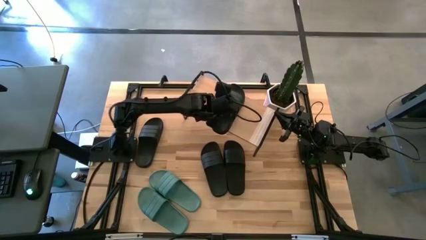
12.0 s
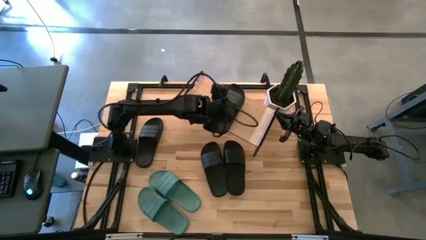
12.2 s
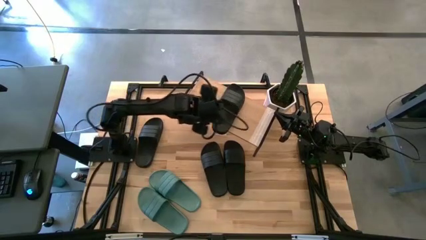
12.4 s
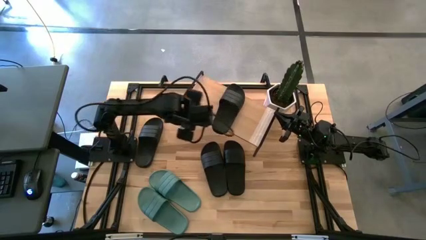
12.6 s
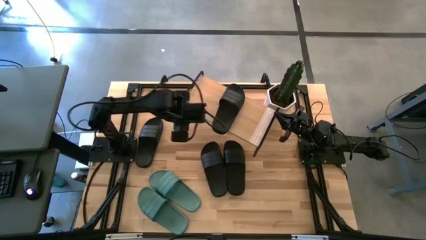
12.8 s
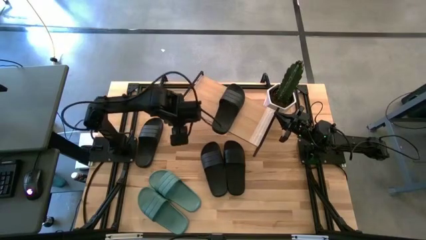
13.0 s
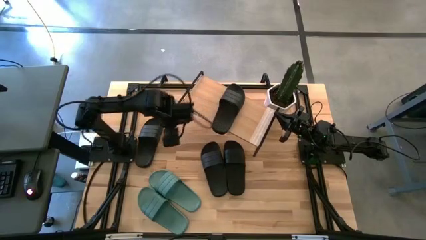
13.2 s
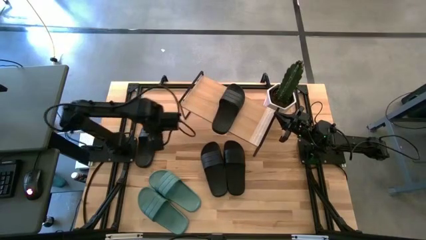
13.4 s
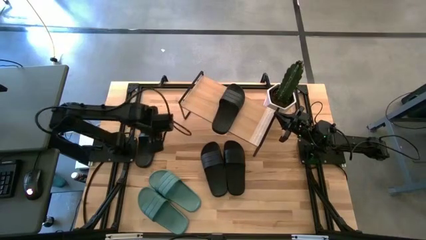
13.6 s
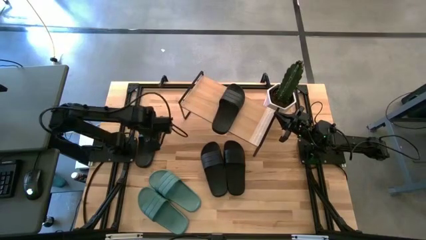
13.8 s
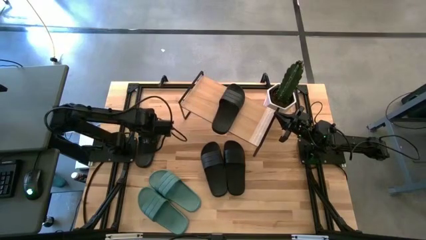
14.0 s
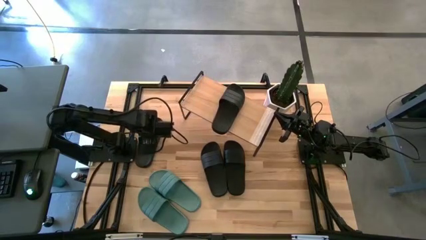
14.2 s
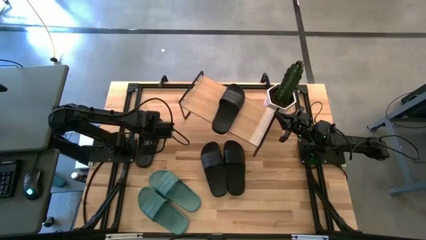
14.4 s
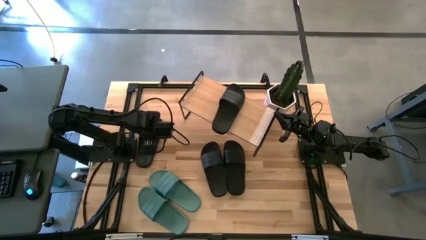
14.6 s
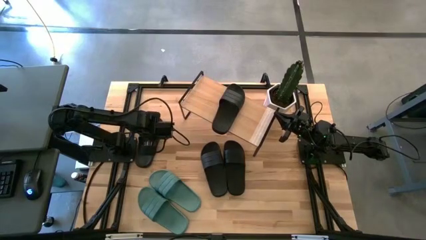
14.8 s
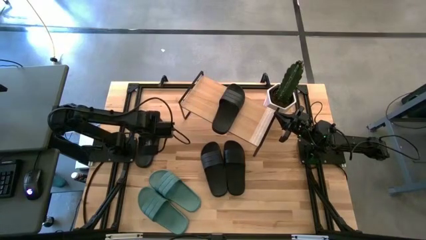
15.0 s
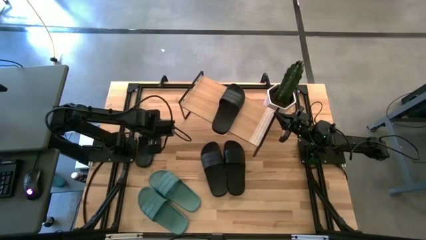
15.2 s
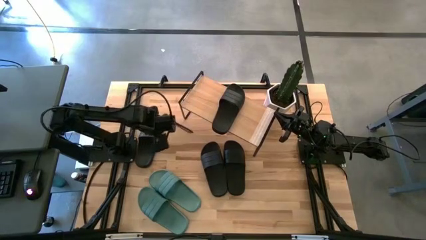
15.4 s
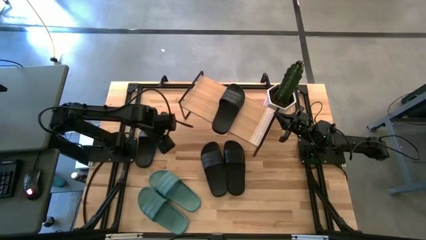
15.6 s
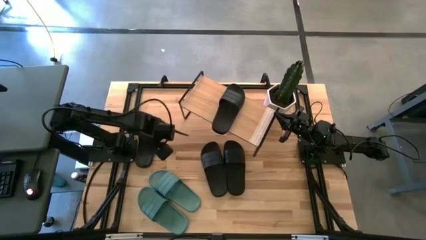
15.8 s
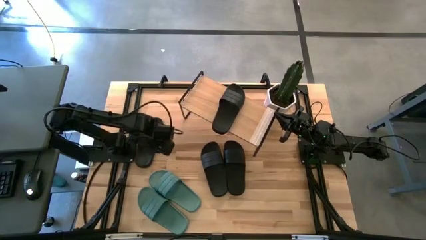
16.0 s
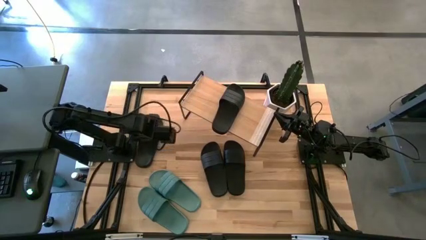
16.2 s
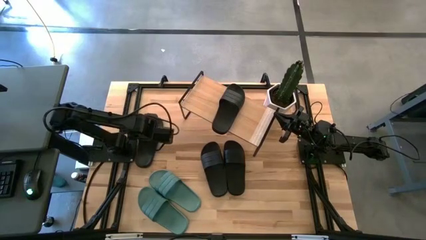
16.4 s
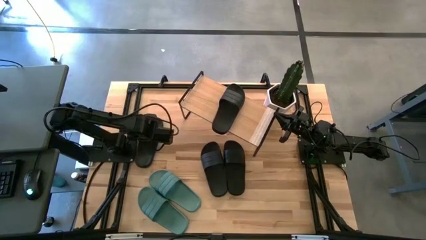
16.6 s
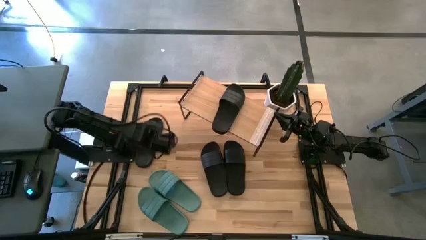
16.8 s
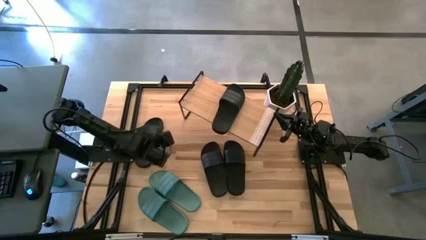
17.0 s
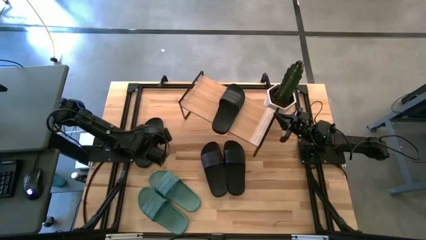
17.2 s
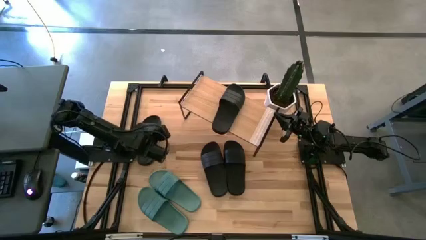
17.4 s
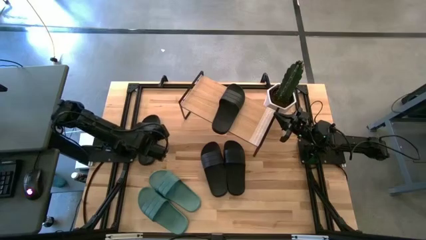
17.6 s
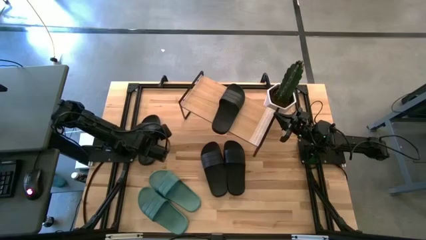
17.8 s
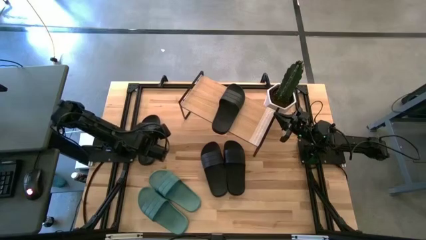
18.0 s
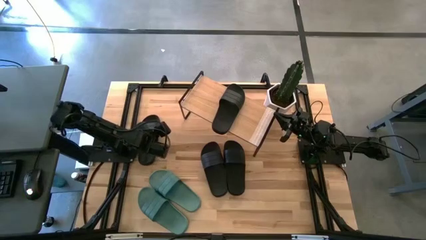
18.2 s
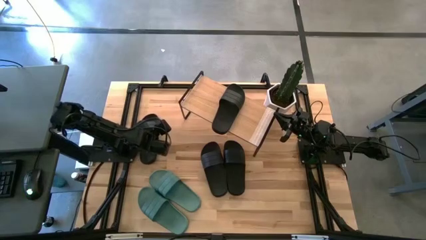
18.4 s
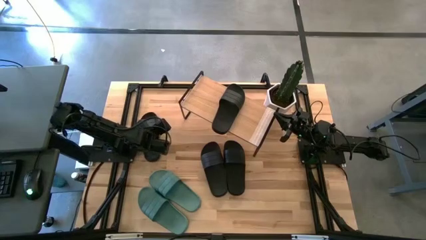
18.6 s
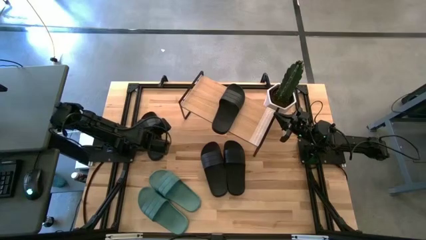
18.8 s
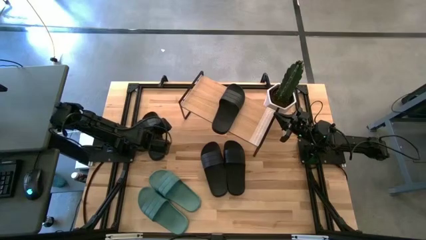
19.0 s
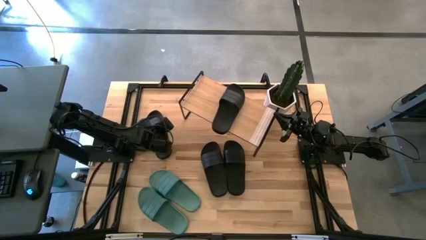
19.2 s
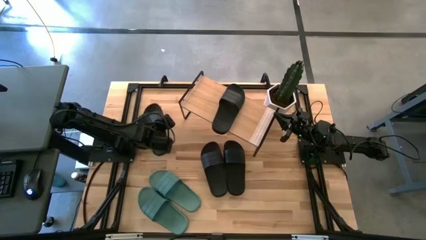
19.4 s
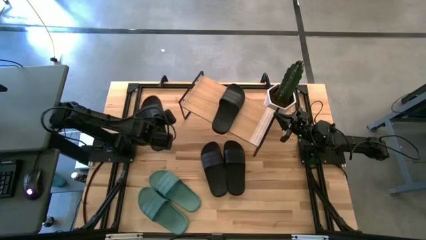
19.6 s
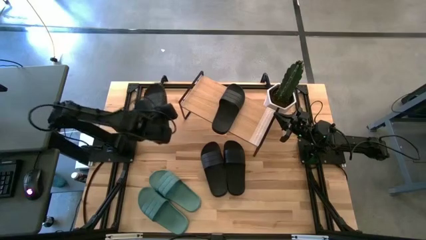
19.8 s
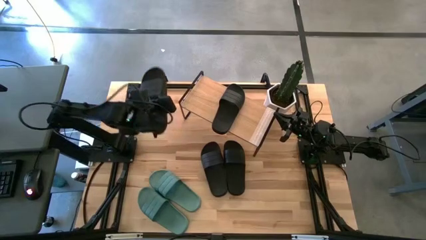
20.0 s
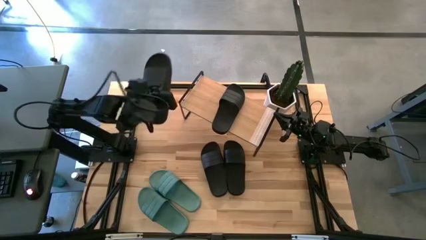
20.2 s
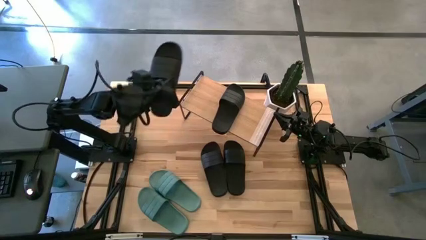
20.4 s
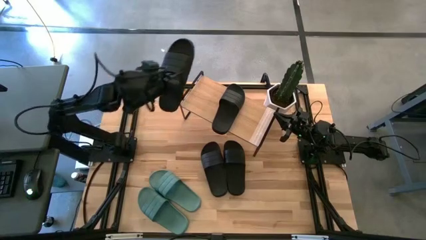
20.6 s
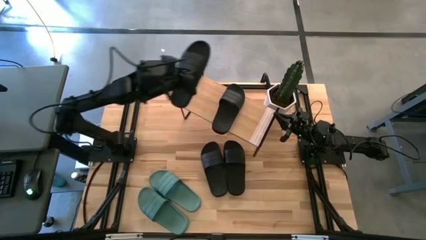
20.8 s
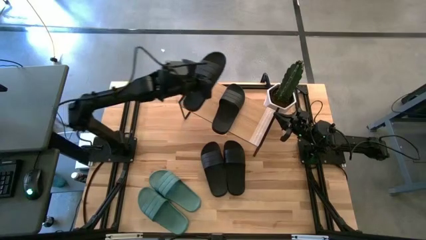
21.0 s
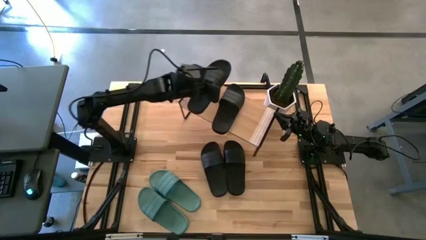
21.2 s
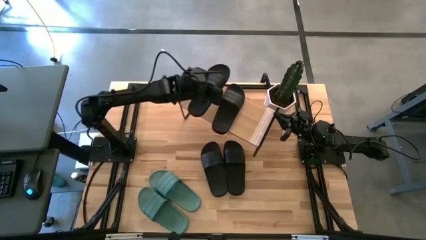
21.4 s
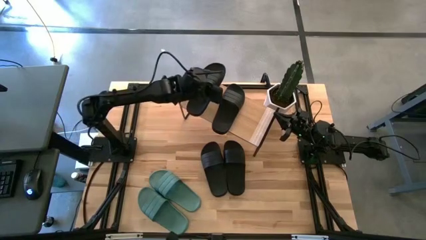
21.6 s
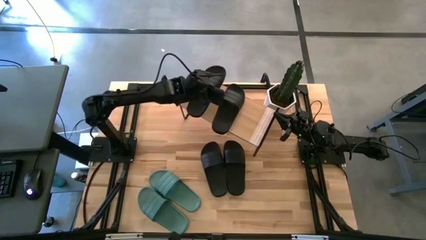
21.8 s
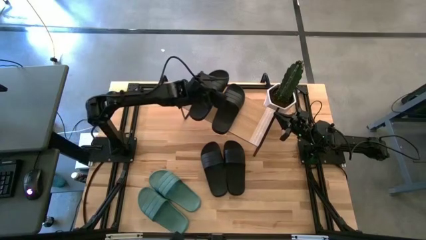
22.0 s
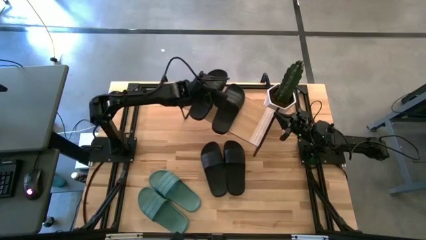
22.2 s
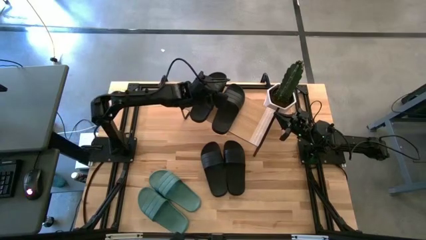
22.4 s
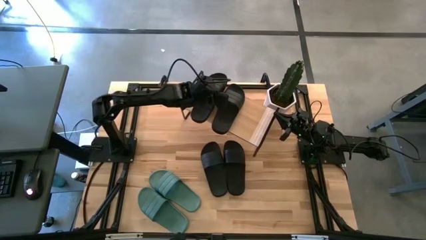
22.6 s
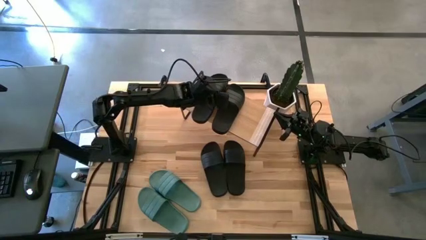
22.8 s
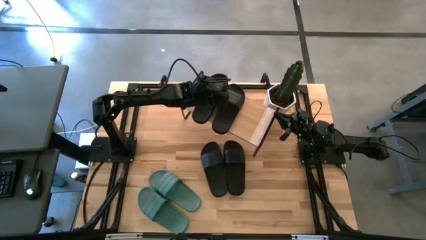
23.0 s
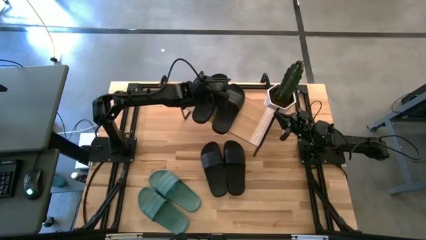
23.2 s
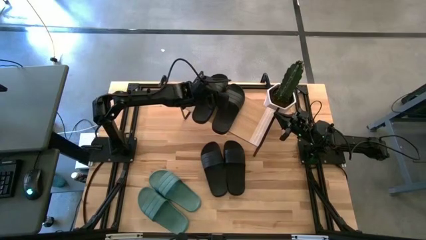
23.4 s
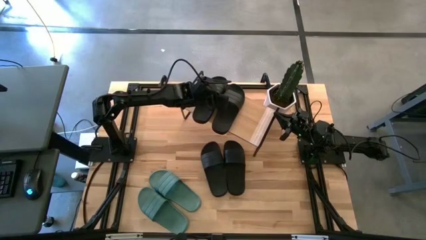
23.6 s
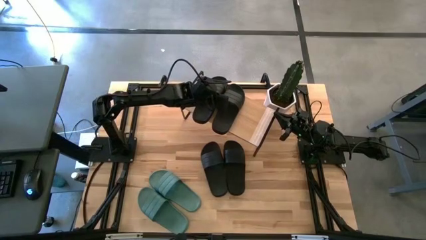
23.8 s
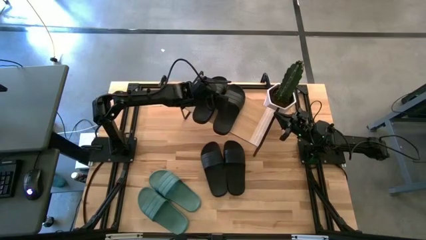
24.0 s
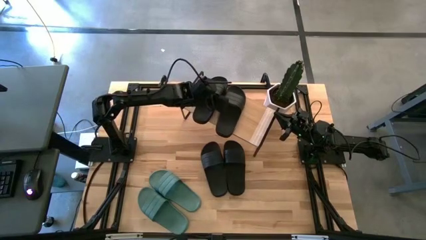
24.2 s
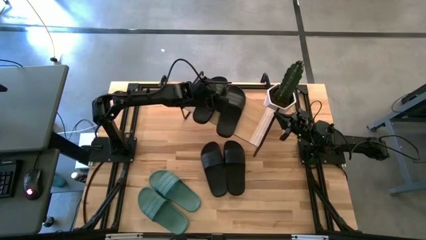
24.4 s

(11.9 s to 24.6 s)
Task: Pick and place slides into the shelf
Put the black slide on the shelf

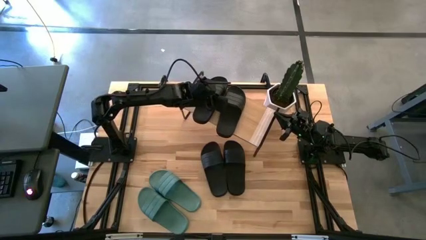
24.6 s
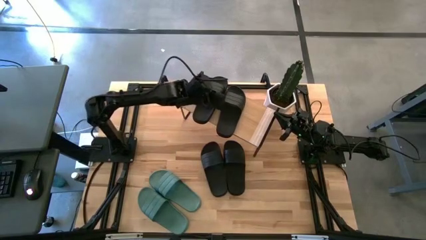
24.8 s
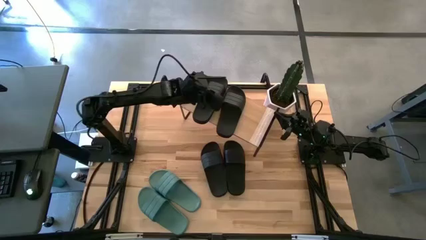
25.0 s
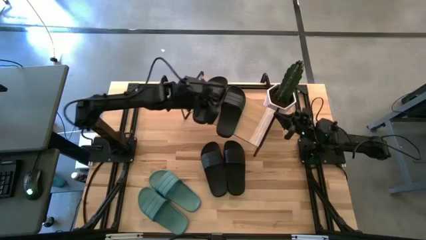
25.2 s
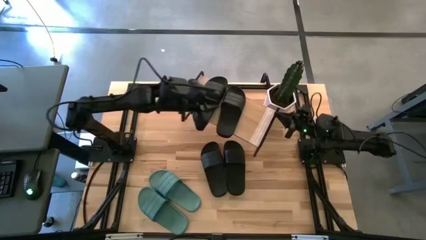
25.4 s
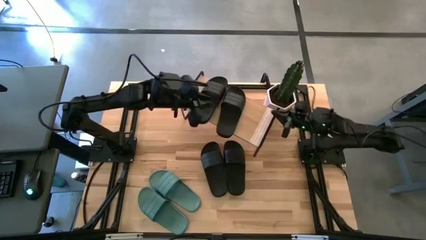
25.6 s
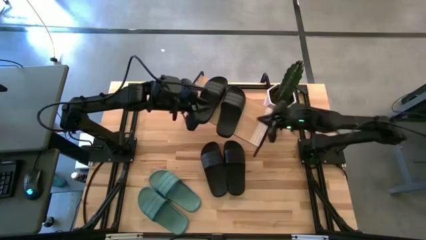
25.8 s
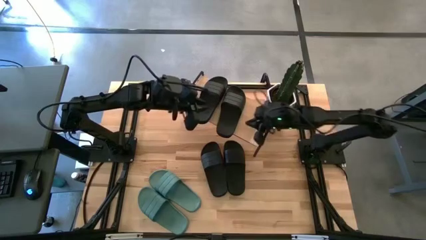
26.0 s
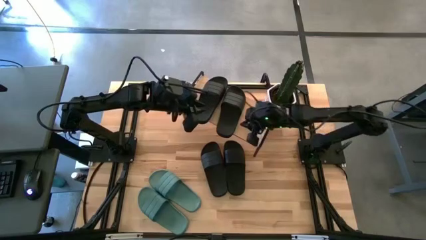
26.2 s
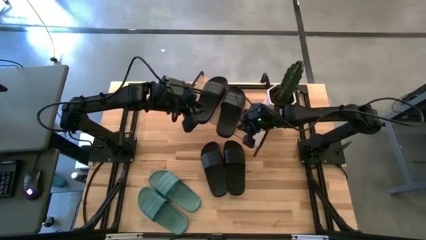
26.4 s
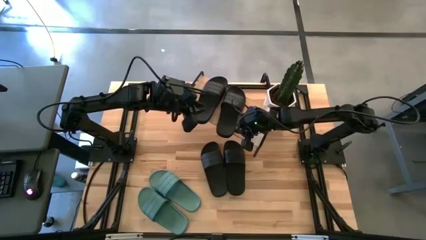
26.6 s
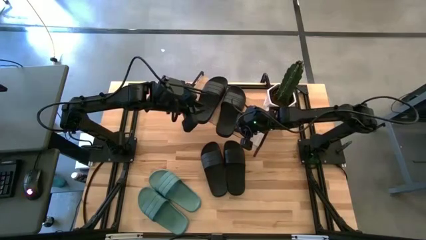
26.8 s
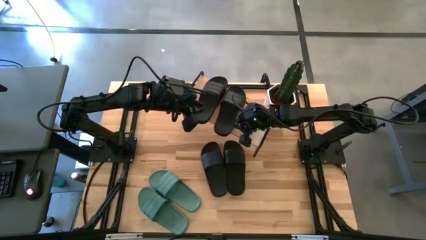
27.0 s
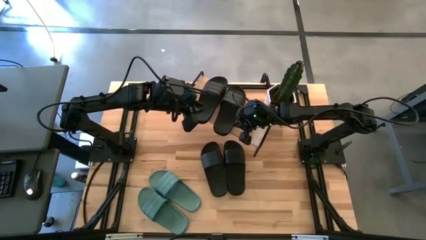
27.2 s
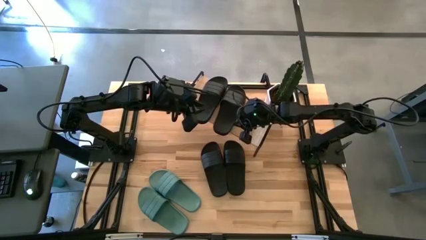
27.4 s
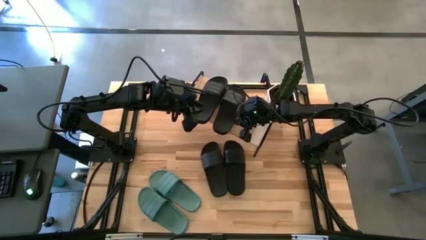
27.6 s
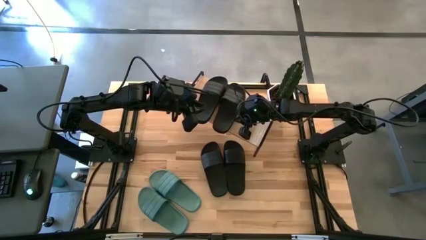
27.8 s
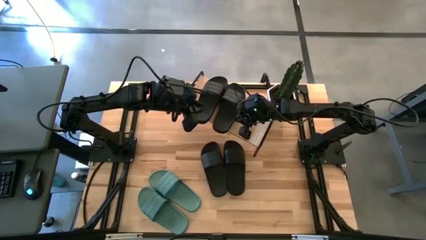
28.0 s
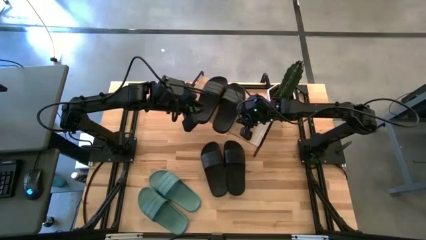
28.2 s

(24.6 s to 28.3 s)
Adjust the black slide on the shelf
